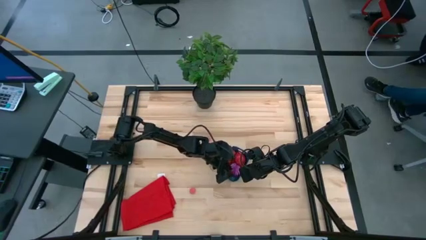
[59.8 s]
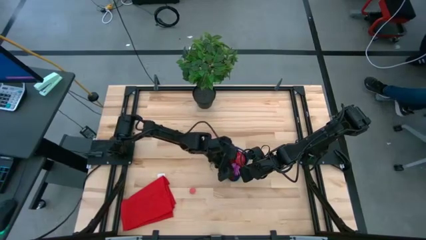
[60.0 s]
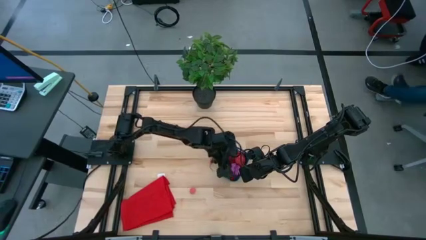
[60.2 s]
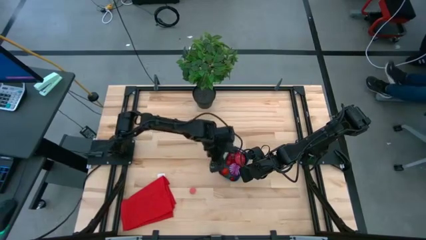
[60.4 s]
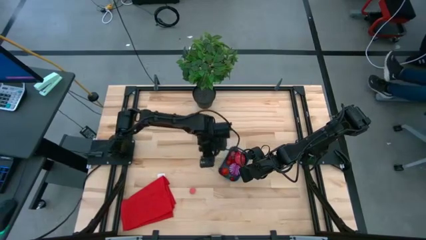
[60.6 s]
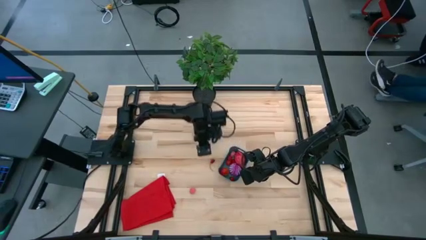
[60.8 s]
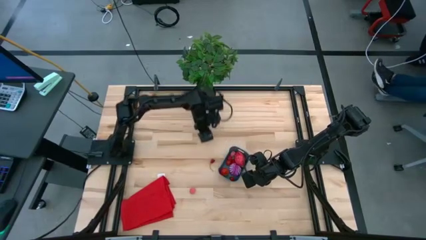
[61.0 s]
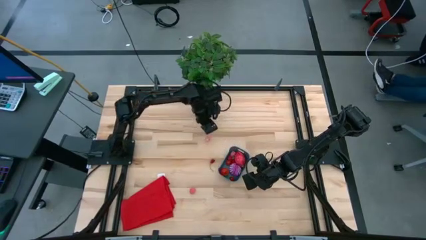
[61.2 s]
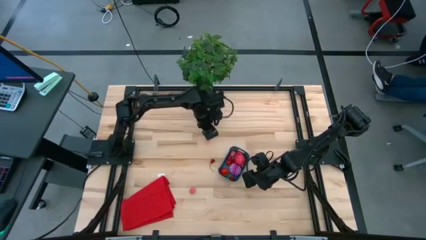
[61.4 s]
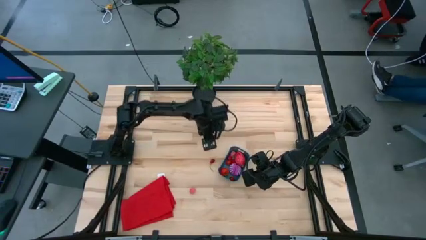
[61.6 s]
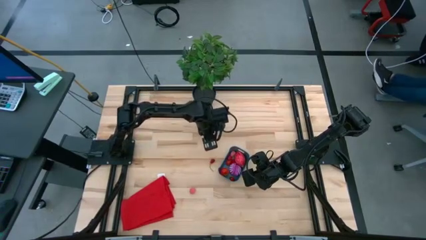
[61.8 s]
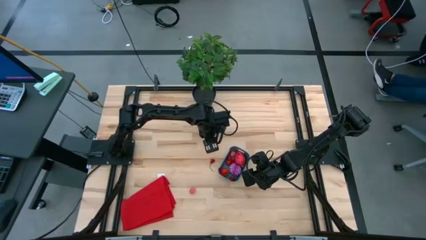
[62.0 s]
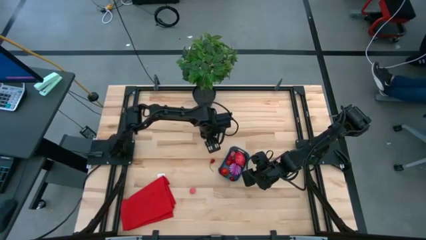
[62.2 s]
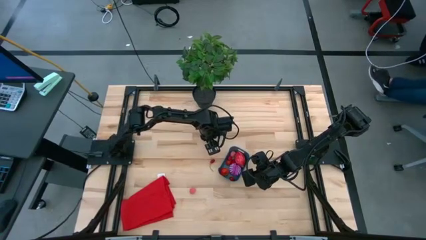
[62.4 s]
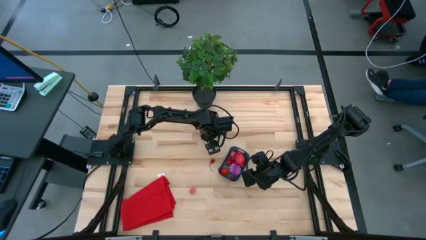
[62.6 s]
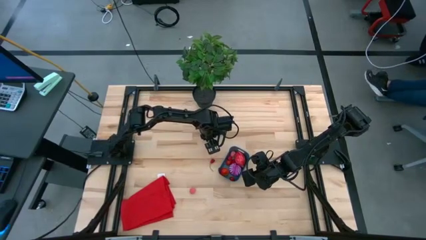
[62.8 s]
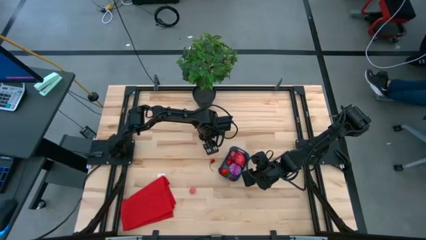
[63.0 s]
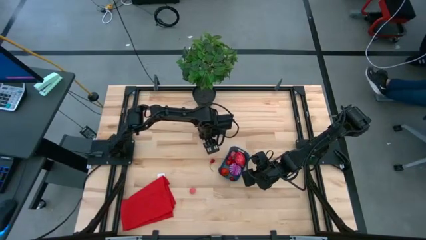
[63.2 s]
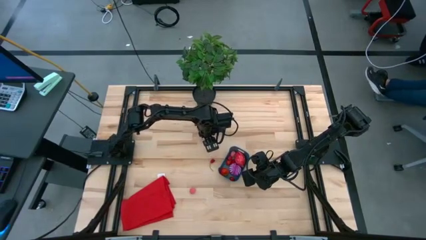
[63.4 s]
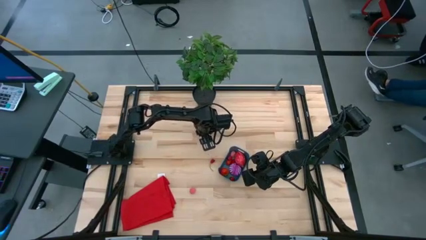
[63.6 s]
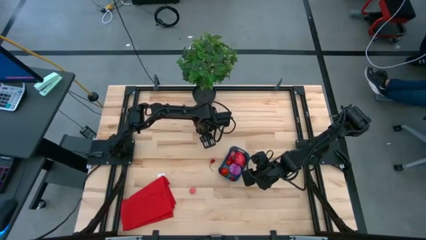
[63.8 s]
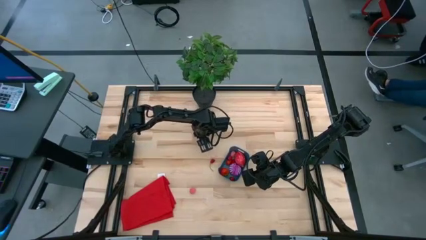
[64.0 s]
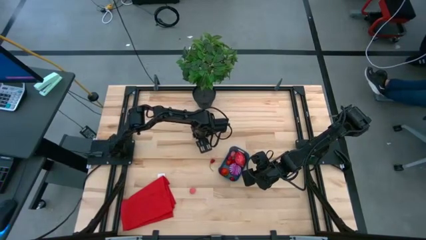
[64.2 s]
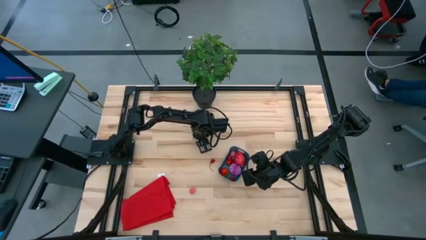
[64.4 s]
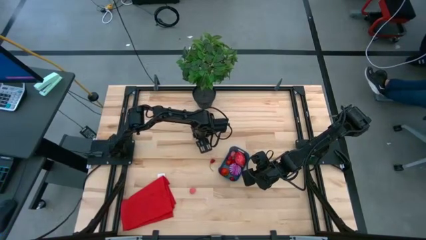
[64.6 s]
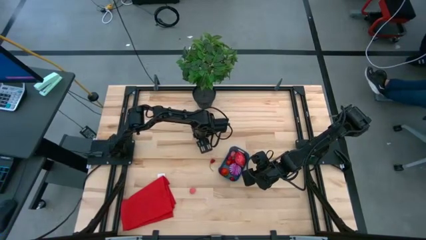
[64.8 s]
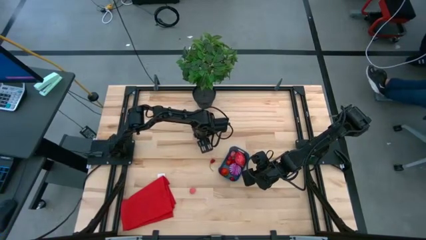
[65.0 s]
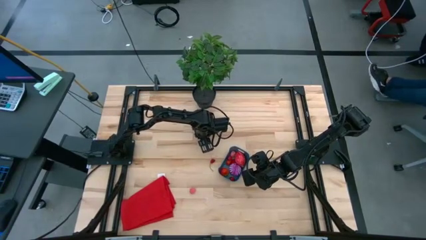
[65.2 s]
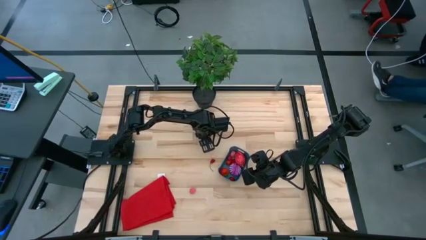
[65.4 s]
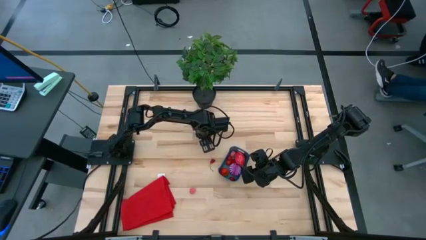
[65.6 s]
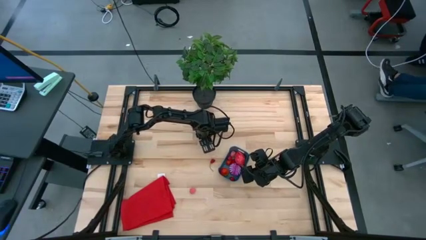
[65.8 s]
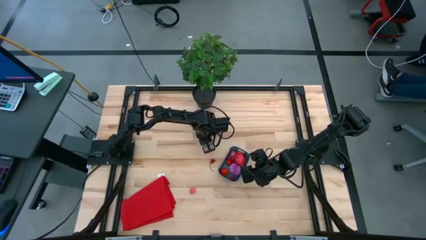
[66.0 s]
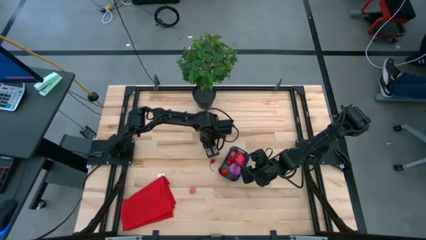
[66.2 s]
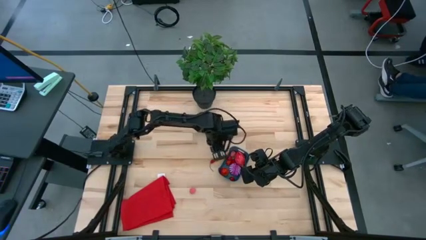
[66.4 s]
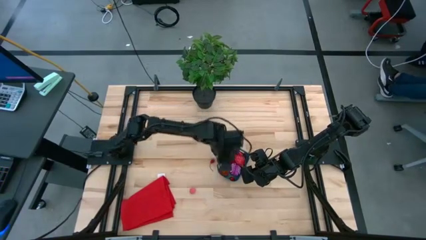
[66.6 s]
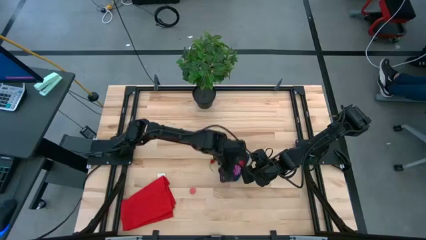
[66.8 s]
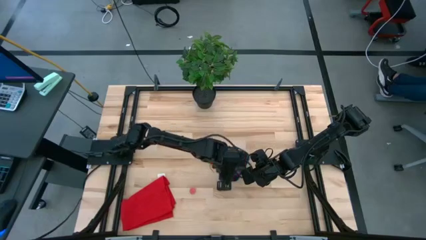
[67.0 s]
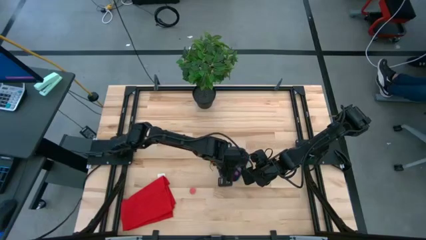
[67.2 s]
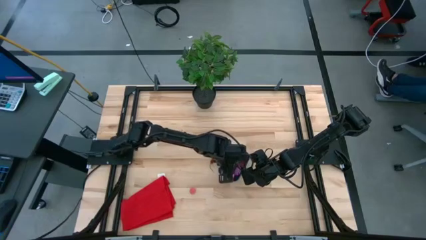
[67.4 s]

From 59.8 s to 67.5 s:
Task: Pick and placing Produce into tupperware
Put the top peach into the bin

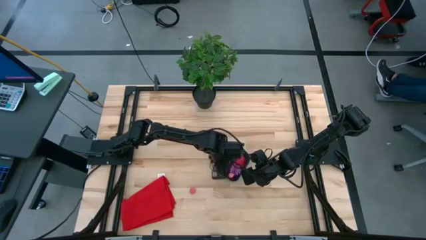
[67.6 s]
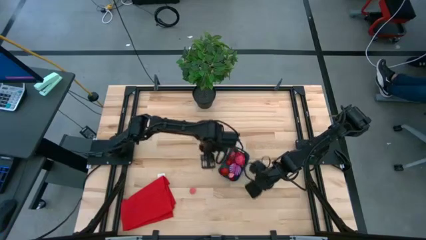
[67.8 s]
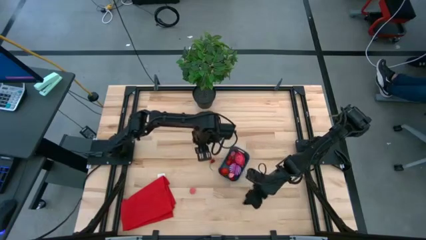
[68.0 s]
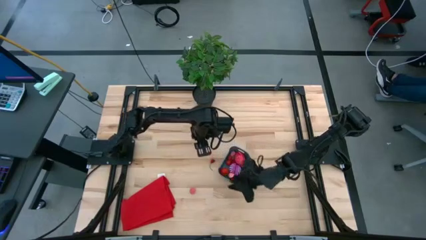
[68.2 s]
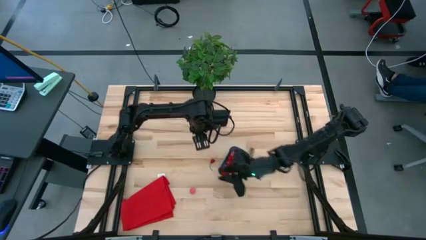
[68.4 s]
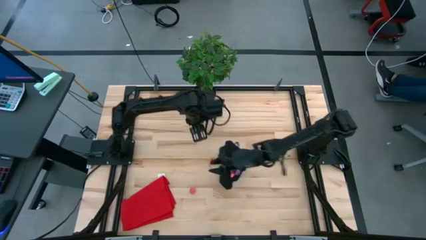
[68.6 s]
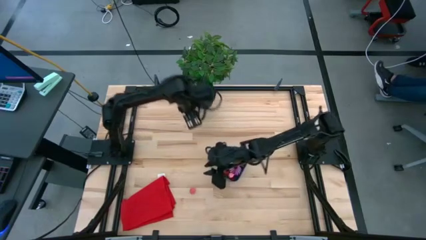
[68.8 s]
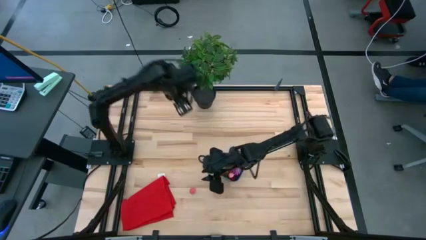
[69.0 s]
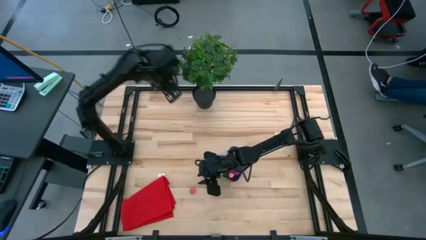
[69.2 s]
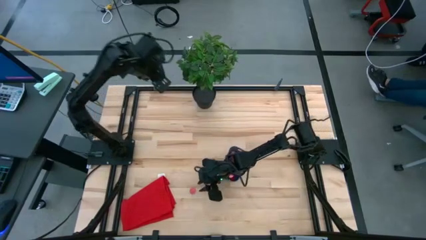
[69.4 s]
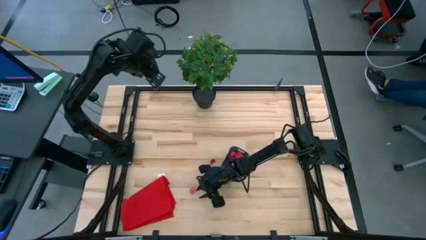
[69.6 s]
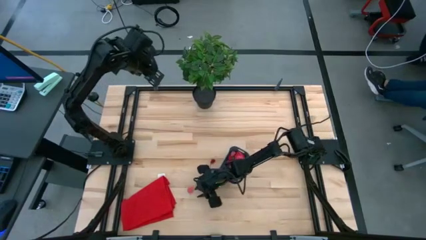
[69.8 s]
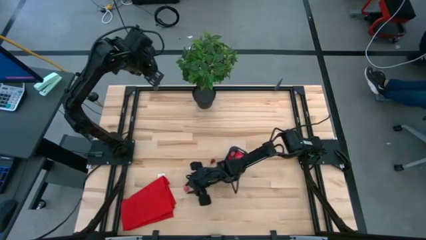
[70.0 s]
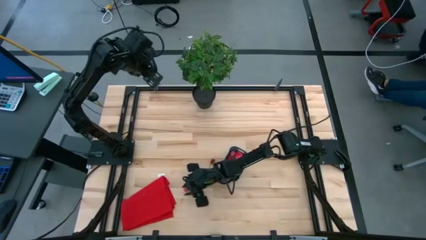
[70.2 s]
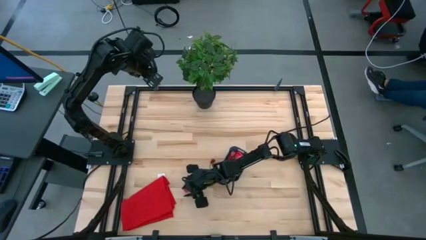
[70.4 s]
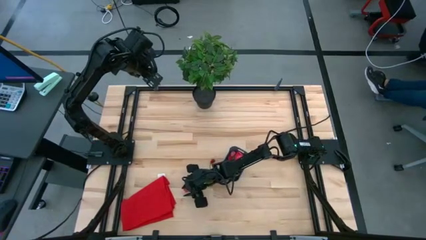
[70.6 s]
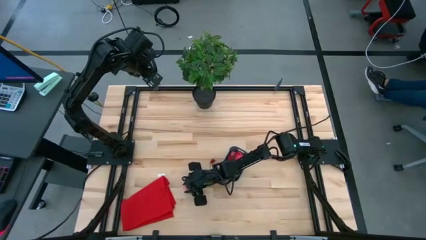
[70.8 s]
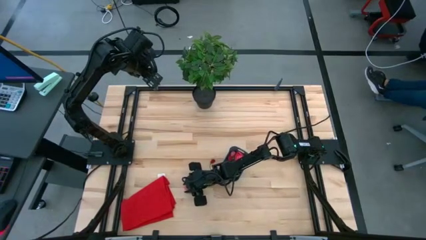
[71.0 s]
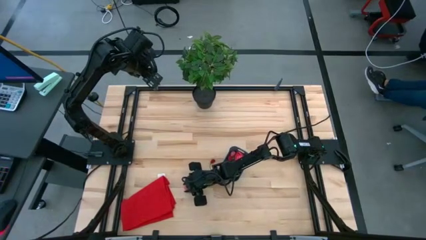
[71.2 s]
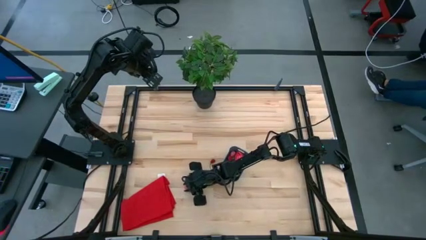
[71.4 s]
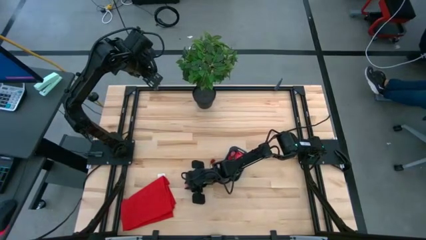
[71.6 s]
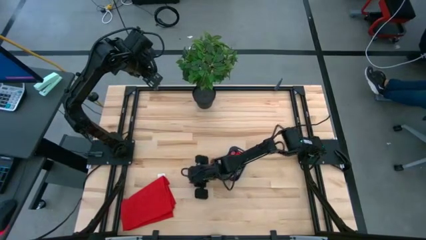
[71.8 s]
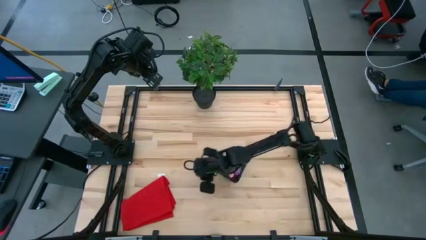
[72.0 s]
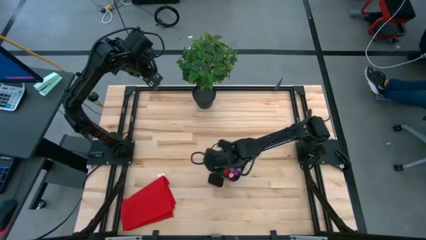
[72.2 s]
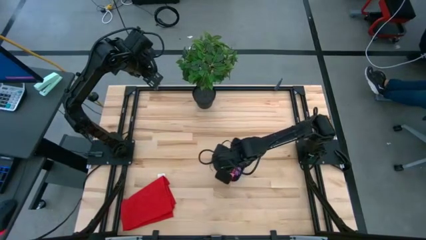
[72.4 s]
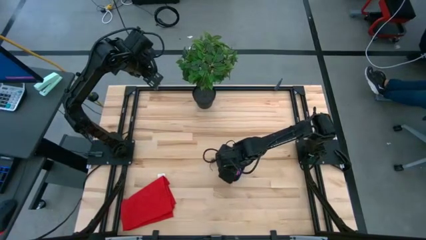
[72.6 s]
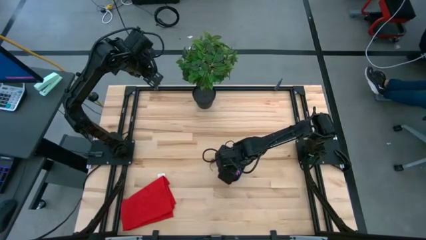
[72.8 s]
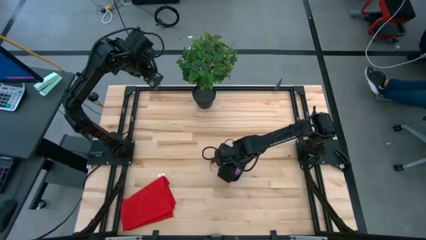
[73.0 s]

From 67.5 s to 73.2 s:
Put the peach into the bin

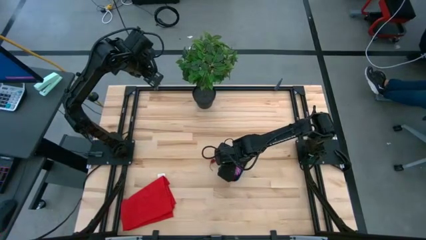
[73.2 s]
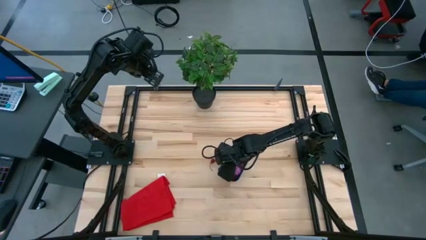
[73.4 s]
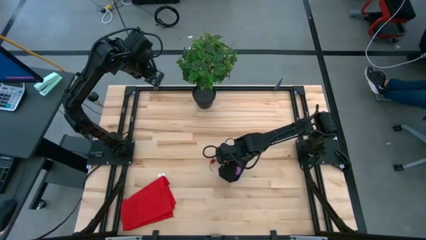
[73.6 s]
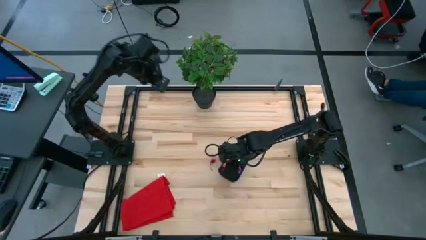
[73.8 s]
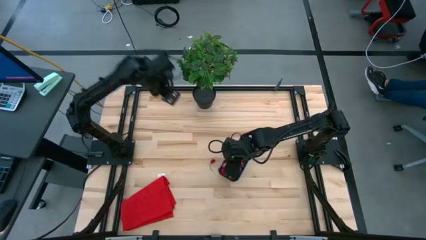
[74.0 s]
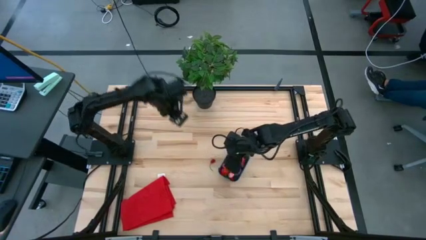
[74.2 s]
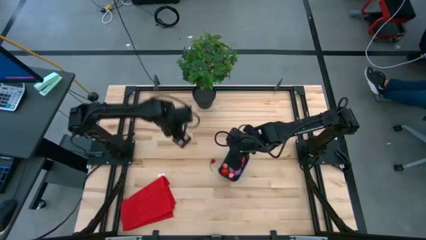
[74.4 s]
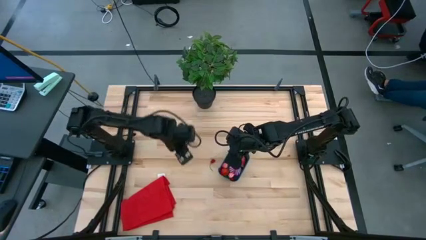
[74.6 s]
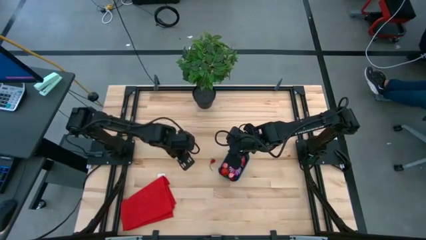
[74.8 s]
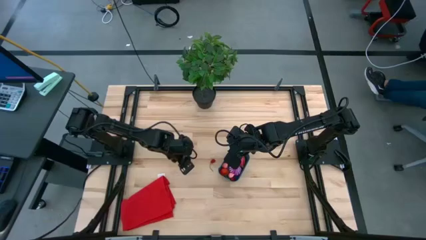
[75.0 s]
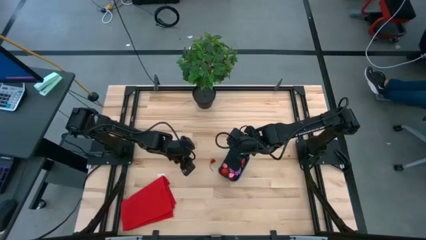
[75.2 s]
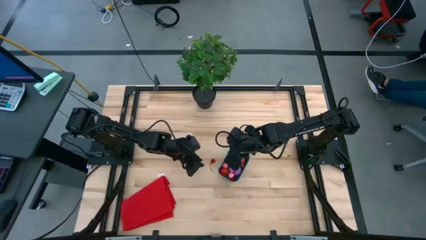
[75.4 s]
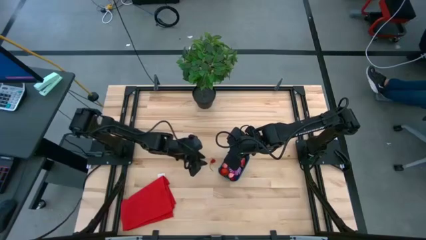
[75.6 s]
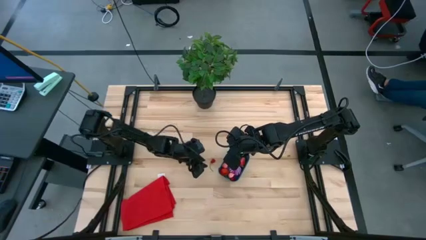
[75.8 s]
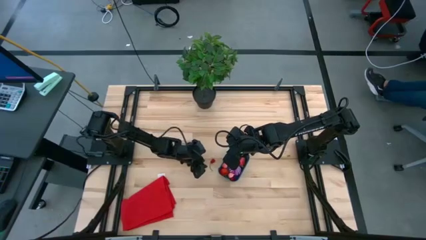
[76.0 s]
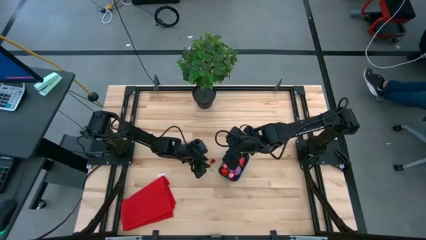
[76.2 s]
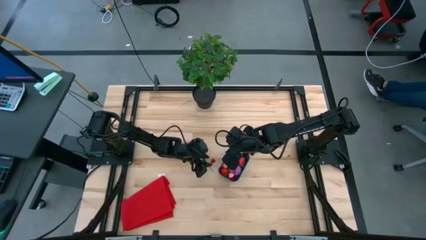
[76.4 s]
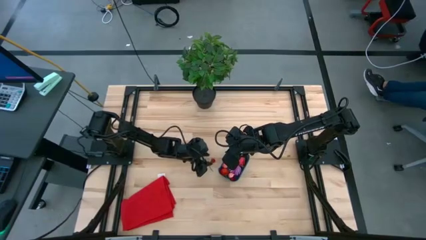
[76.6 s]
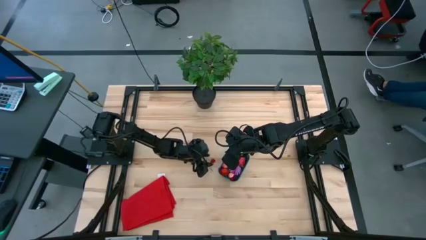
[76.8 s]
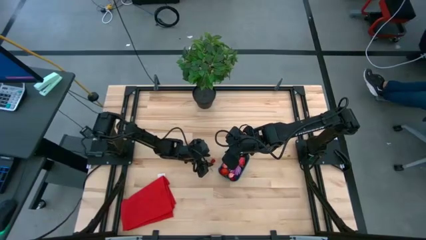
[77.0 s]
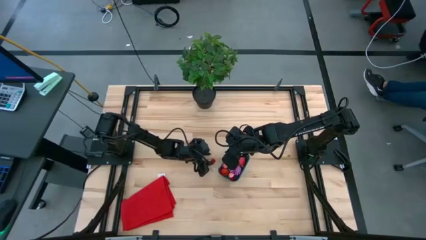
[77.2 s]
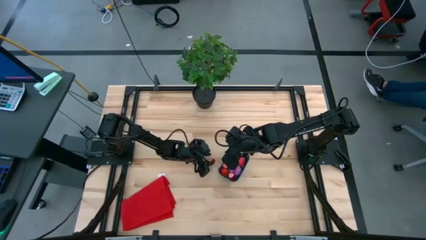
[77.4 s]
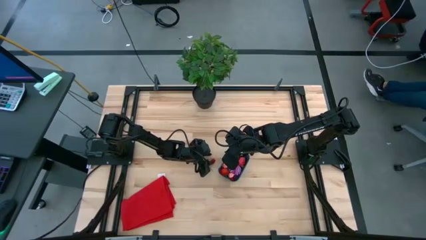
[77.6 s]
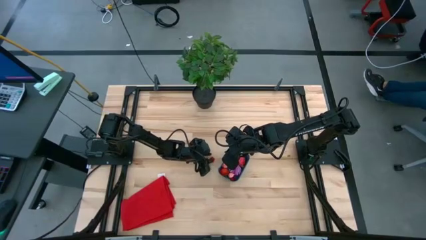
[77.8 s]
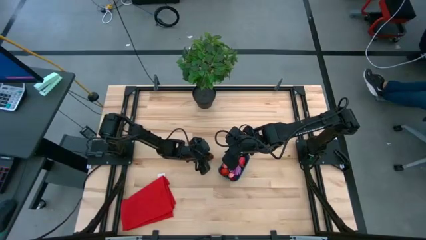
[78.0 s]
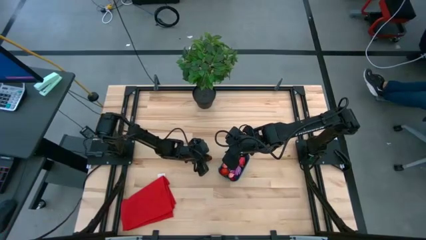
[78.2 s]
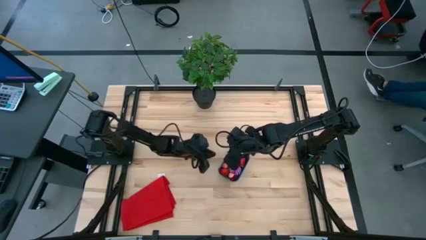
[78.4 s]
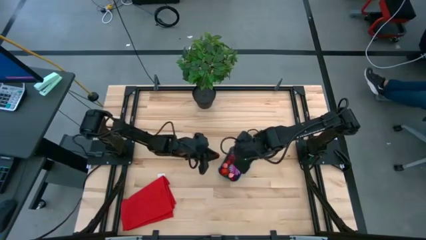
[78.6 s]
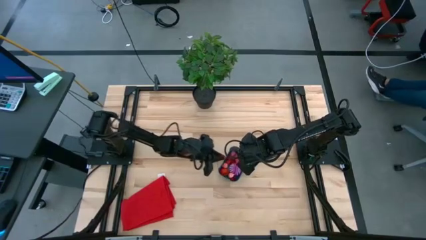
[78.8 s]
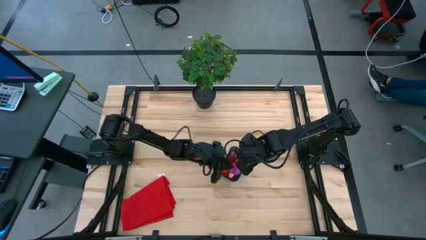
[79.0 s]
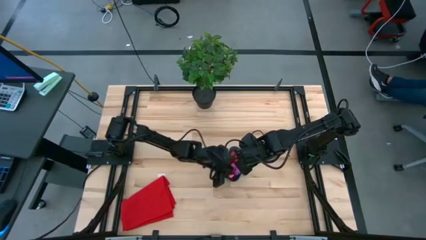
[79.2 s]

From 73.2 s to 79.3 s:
Put the cherry into the bin
